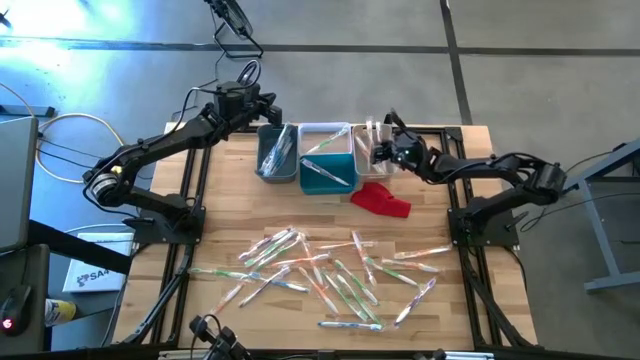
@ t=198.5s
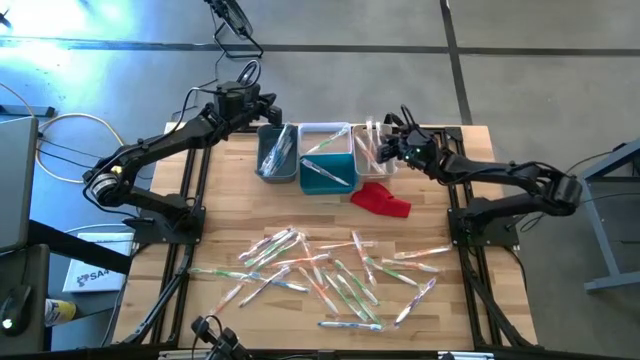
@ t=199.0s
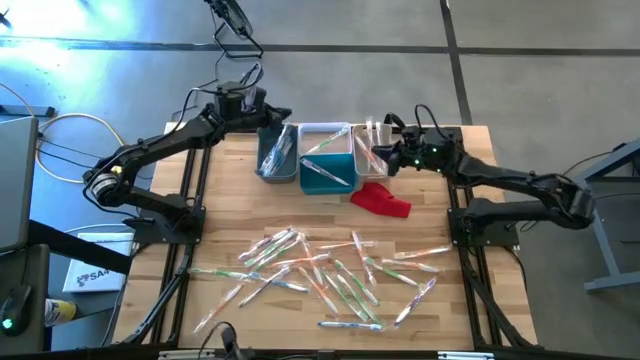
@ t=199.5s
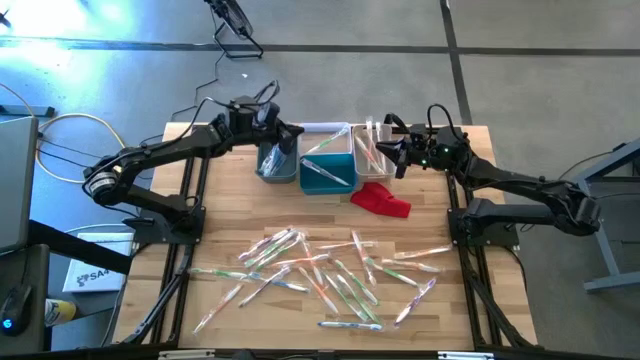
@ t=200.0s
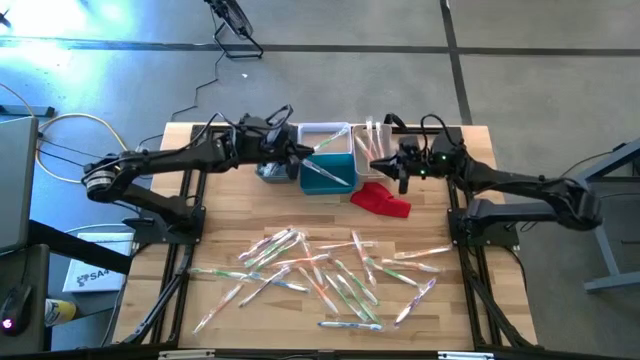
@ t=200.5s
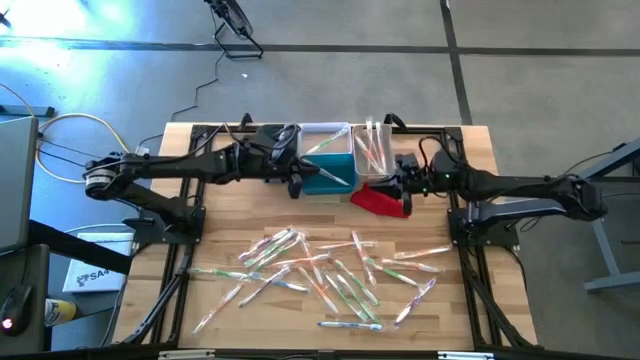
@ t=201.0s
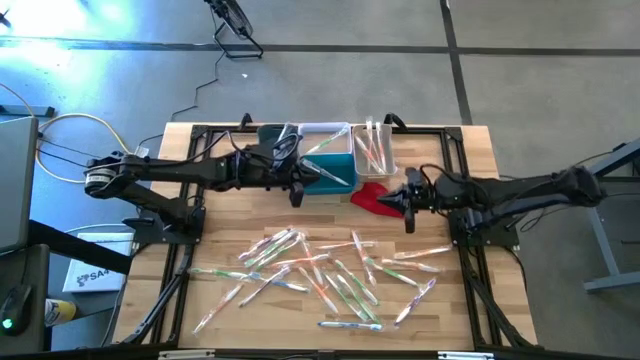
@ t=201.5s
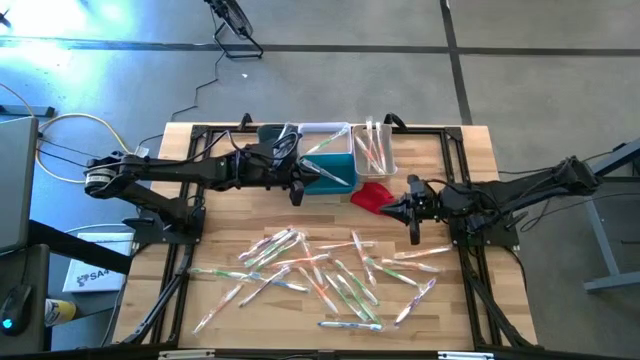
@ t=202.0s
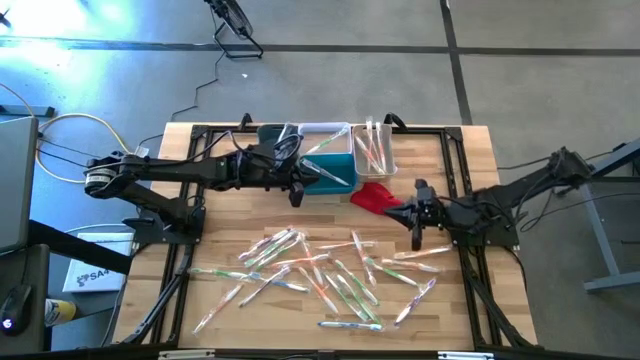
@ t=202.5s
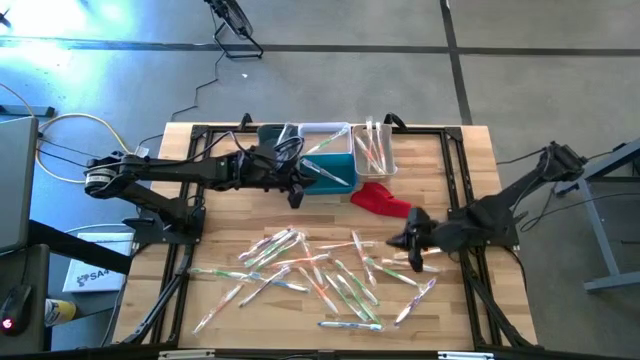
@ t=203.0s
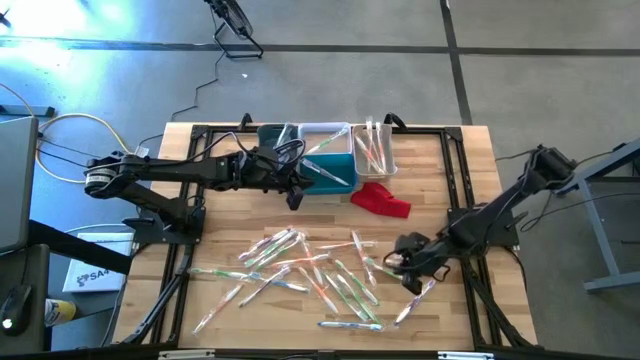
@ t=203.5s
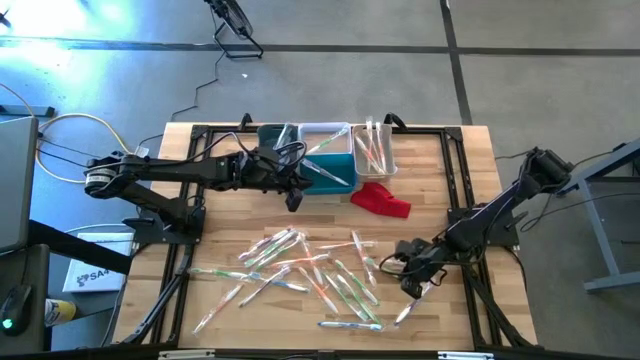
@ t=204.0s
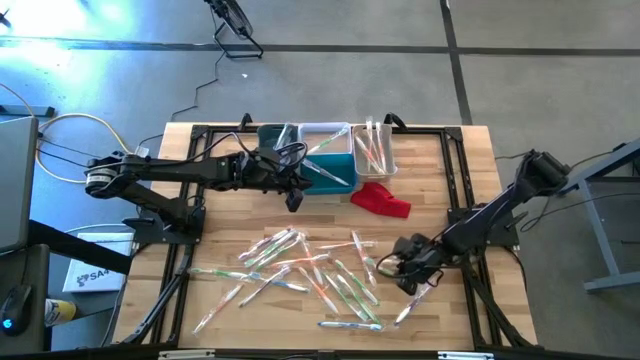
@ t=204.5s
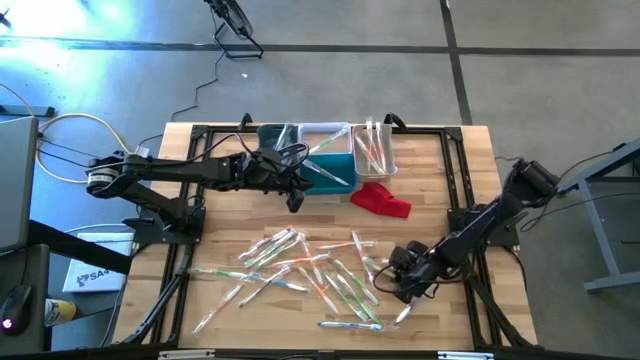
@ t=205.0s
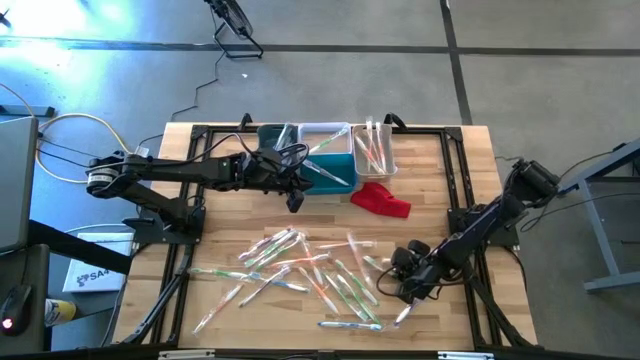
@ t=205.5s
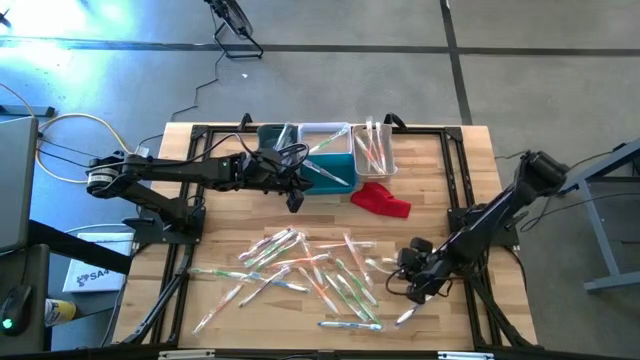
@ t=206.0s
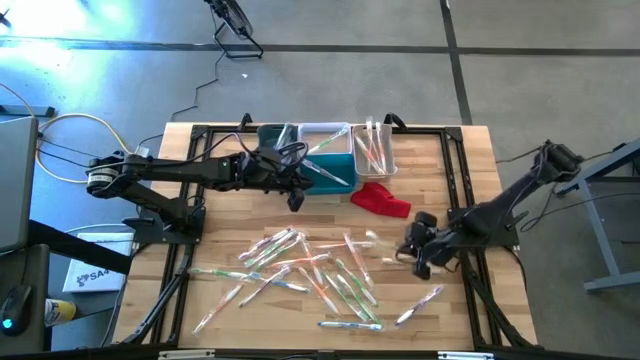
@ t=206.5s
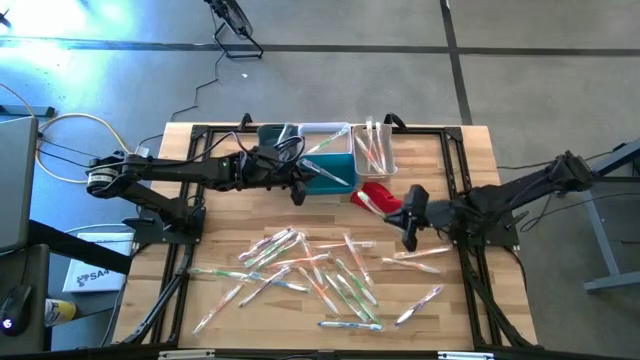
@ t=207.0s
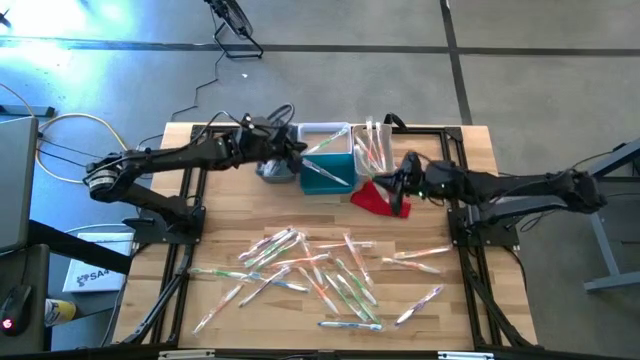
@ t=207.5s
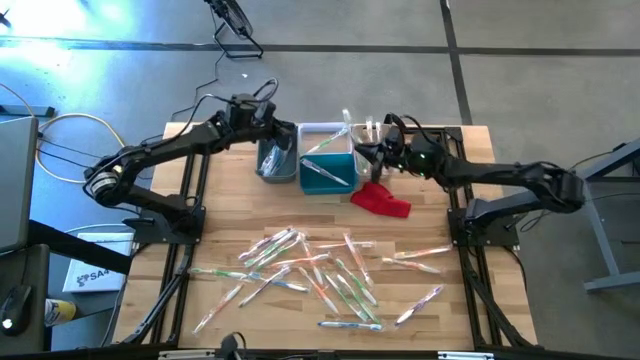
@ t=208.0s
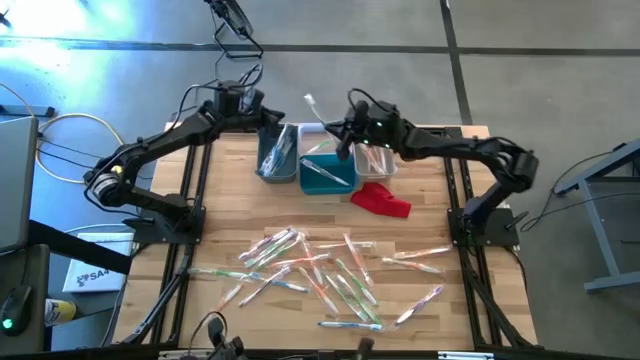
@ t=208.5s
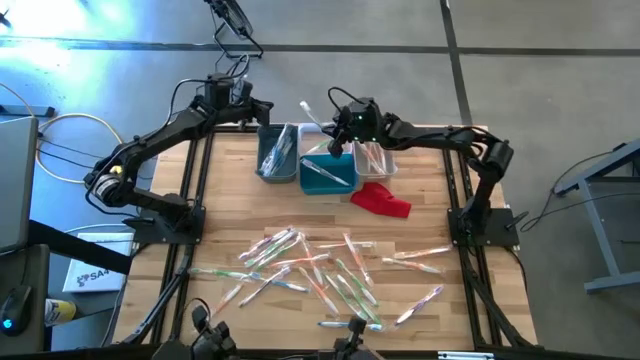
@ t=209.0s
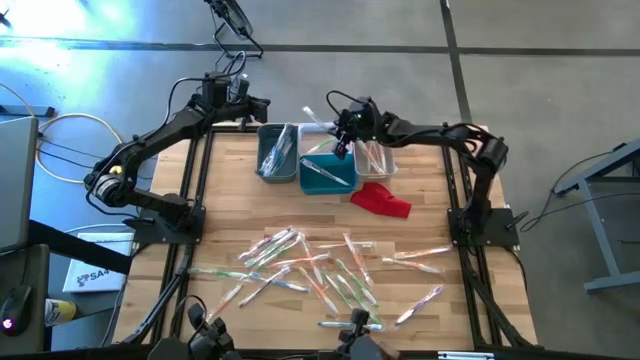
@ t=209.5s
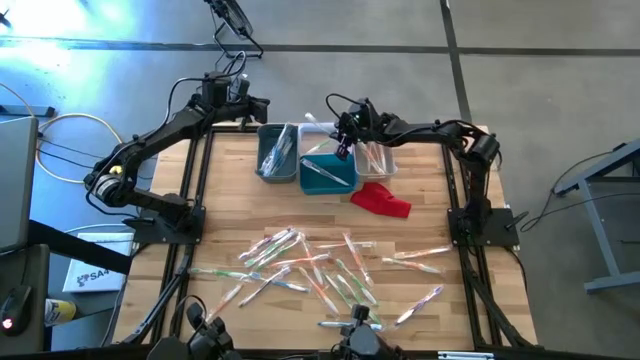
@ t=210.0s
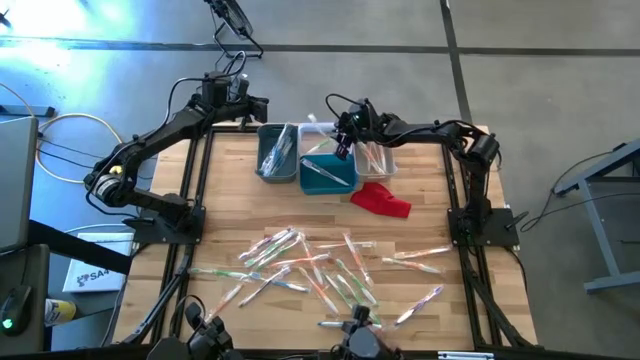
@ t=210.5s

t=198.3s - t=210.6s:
Task: Pick & Place Toothbrushes
Put the green toothbrush into the transparent bin

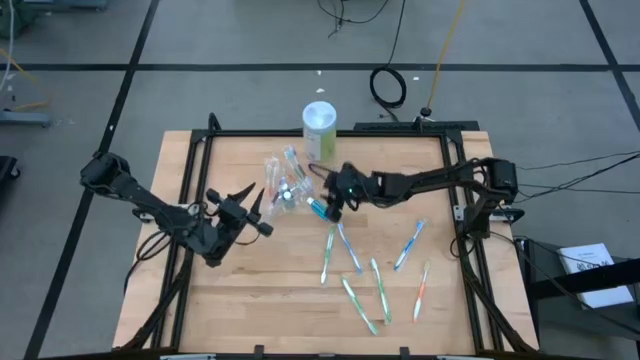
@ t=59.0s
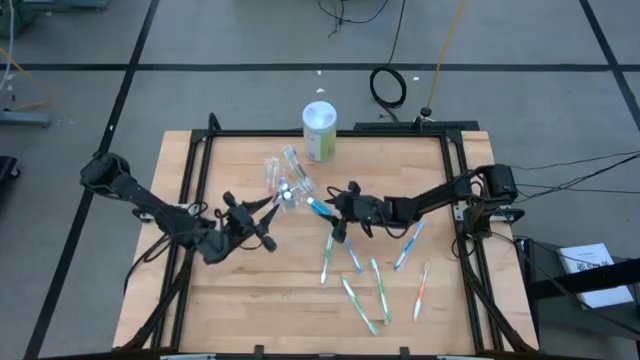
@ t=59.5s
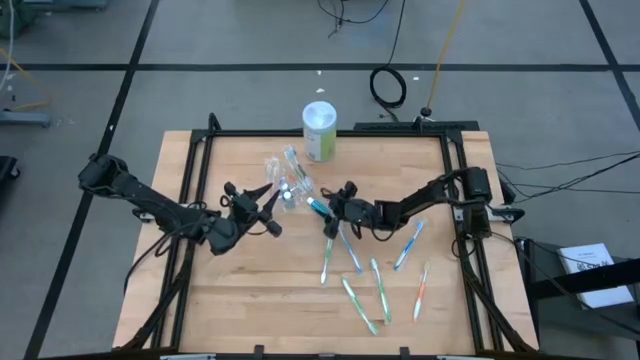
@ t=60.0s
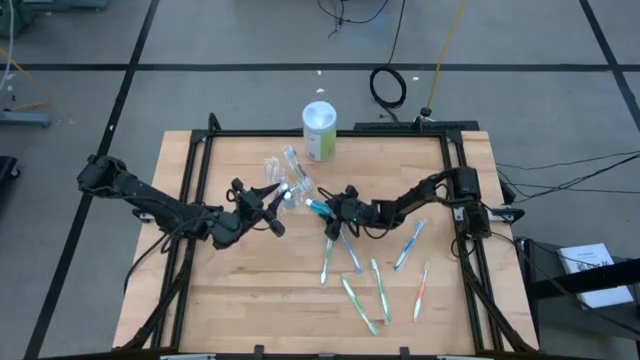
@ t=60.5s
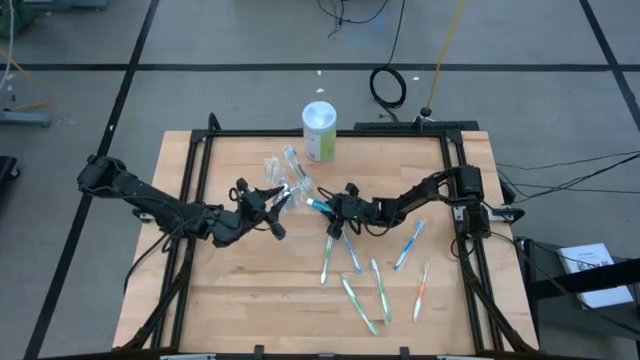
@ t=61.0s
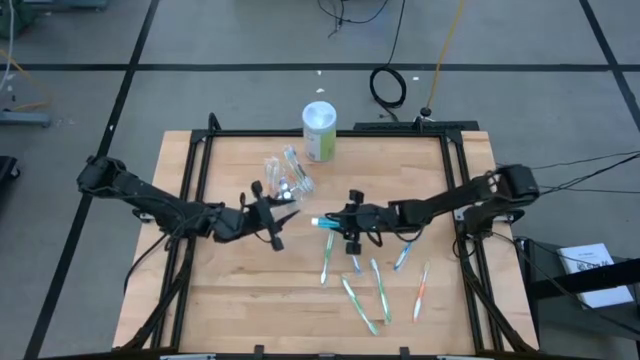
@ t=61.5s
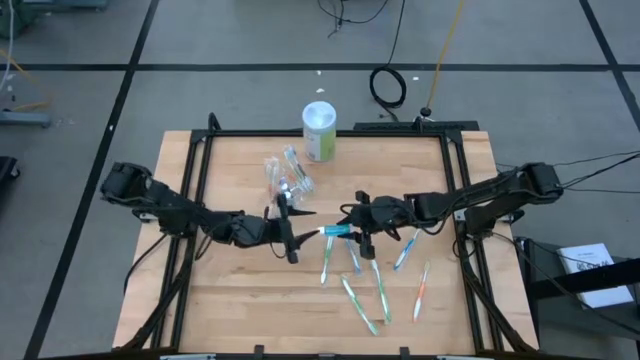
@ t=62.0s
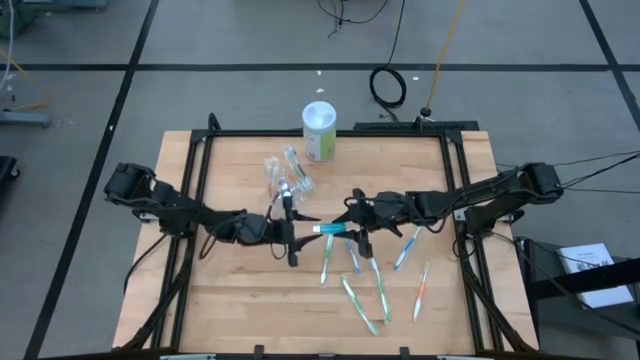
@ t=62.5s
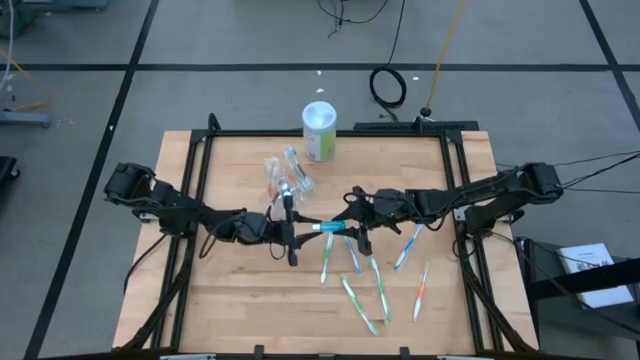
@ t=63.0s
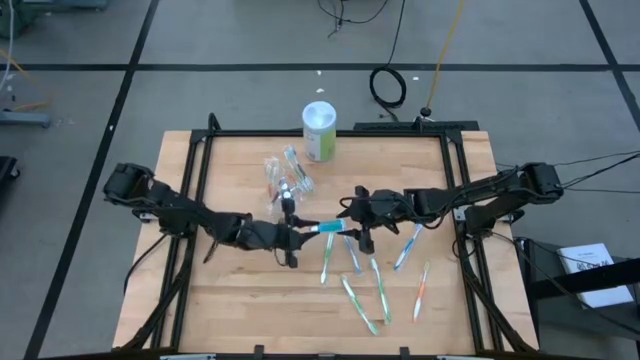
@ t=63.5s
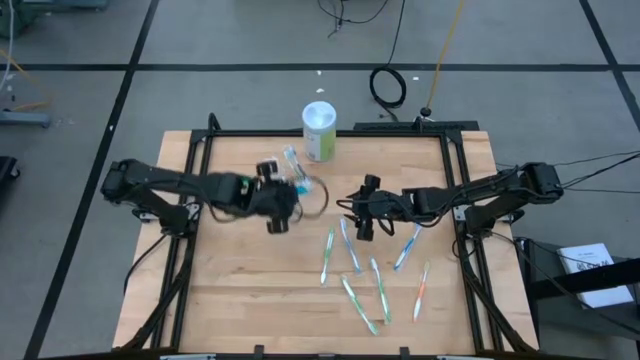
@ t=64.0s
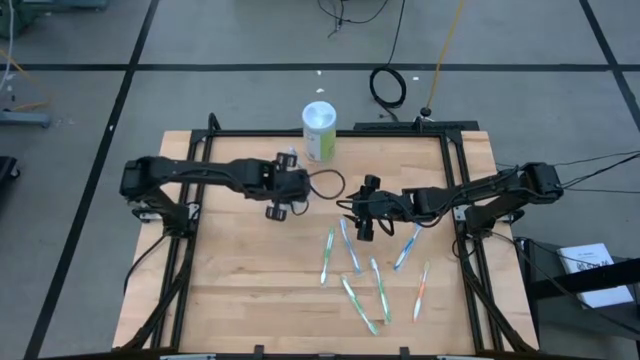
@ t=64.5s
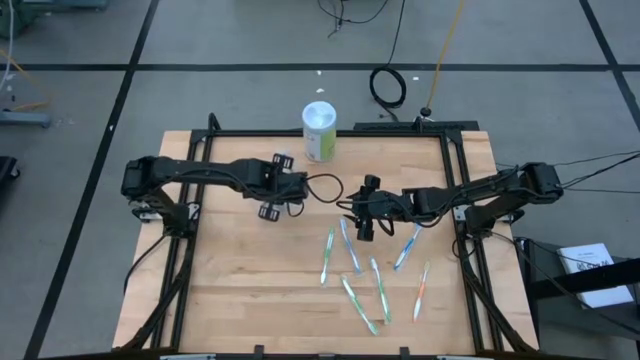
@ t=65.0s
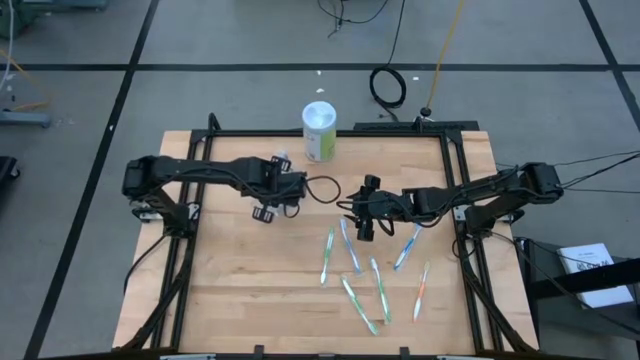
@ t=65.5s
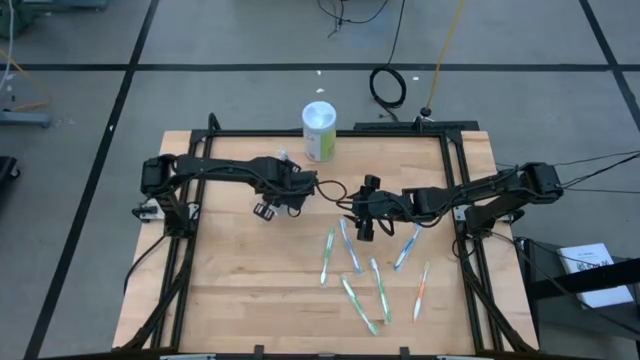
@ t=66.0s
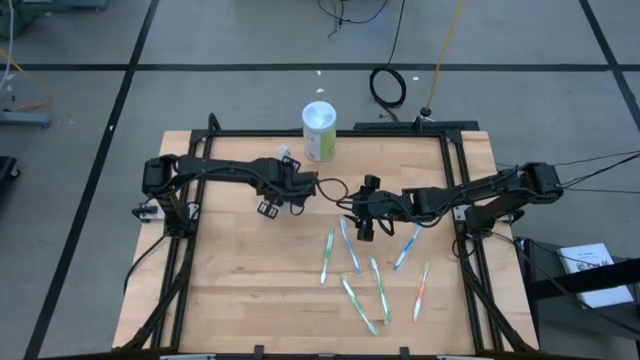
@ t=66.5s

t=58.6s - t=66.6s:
Task: Pick & Place toothbrushing station
Put the blue mouthwash bottle into the transparent organizer
